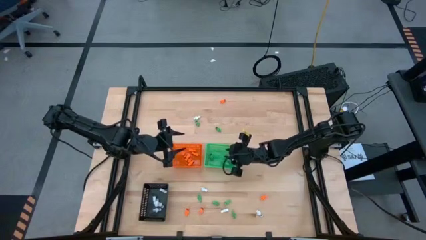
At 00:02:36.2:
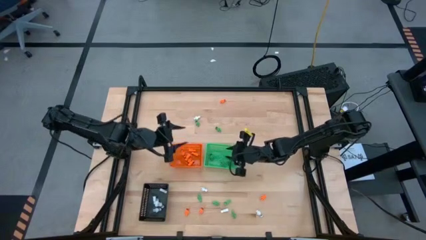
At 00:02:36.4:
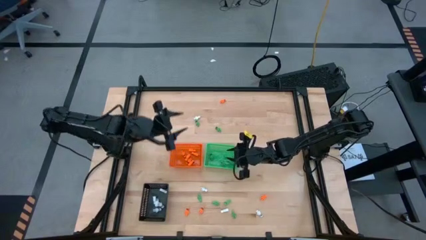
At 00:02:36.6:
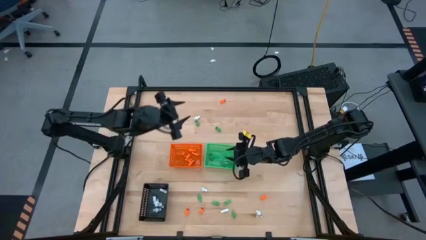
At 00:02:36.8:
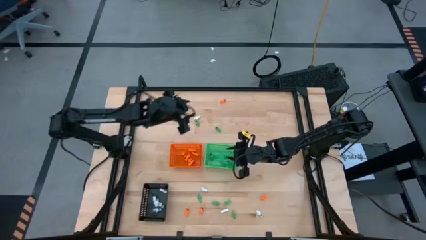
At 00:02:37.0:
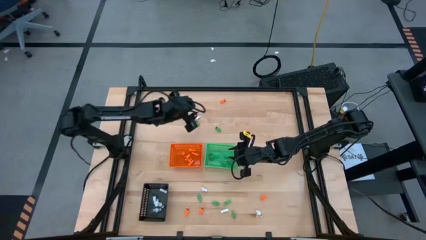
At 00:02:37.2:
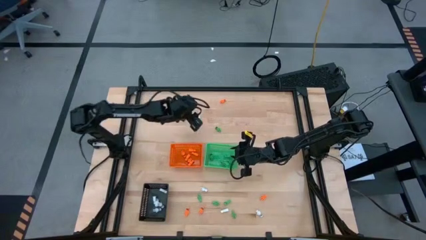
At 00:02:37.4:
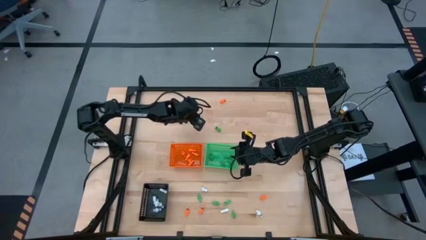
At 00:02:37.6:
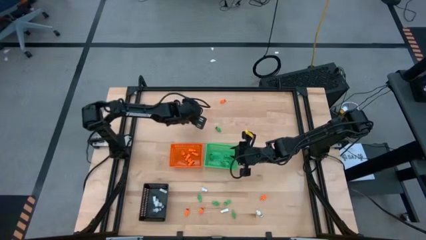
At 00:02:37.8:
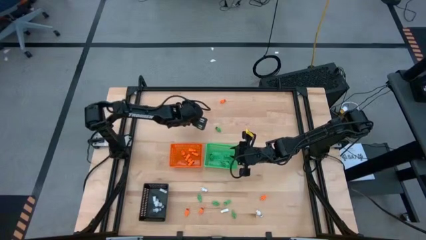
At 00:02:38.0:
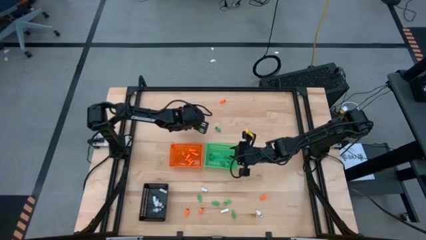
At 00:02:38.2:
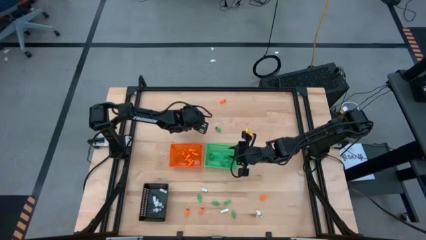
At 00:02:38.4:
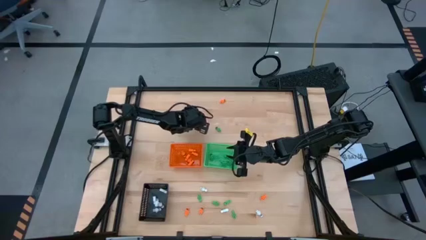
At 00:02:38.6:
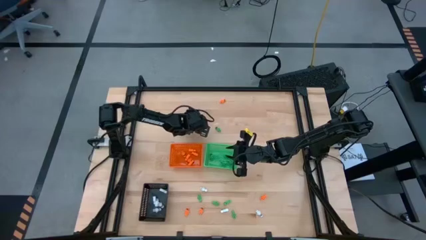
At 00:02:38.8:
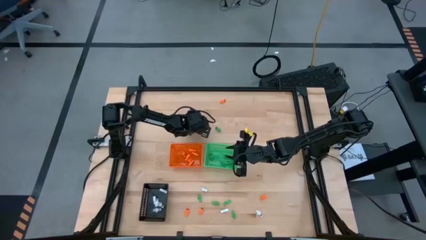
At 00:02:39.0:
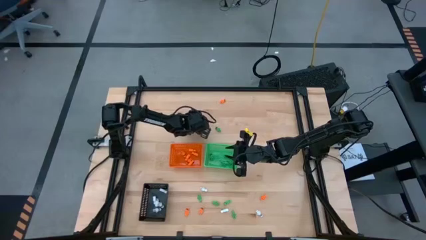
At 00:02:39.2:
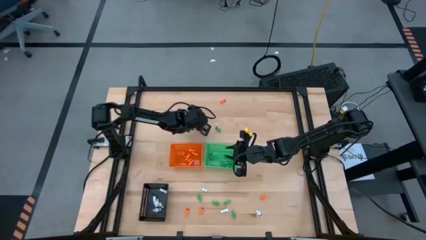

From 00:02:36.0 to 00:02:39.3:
Task: Sort Halloween decoration
Put the green skeleton toy into the green bin

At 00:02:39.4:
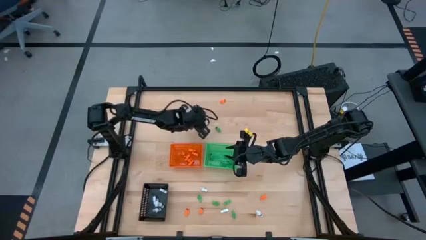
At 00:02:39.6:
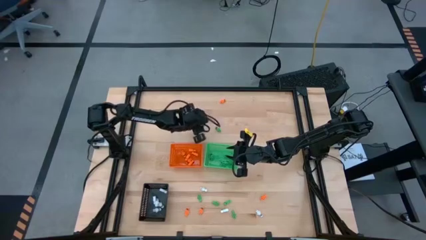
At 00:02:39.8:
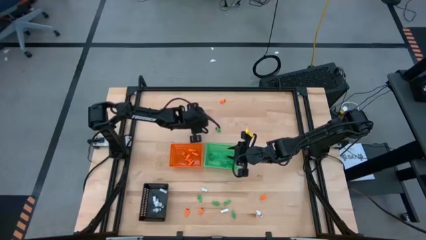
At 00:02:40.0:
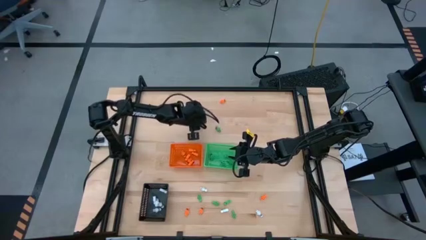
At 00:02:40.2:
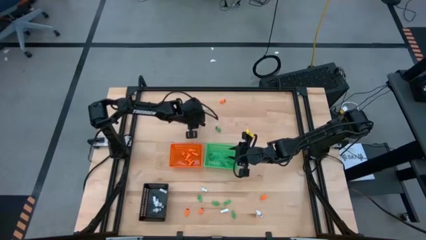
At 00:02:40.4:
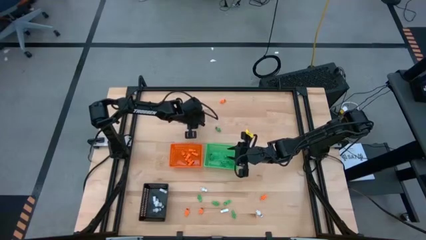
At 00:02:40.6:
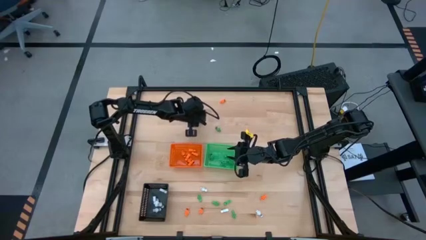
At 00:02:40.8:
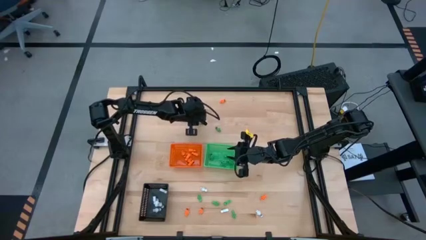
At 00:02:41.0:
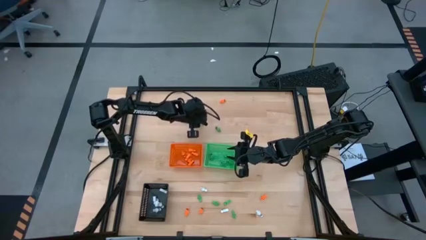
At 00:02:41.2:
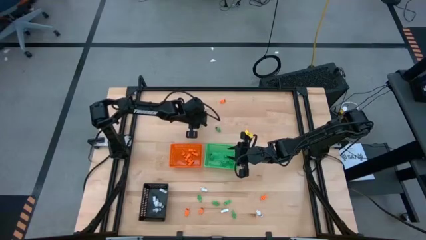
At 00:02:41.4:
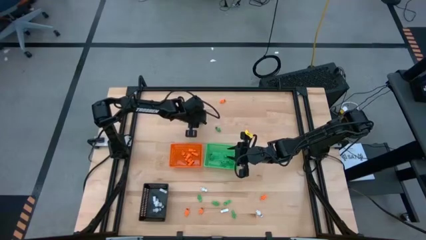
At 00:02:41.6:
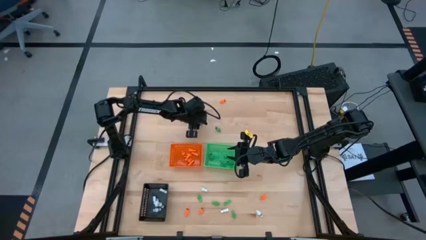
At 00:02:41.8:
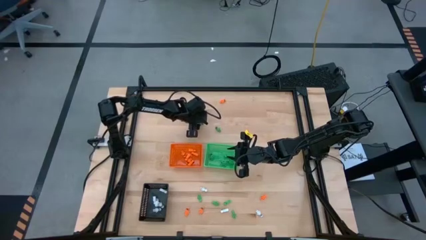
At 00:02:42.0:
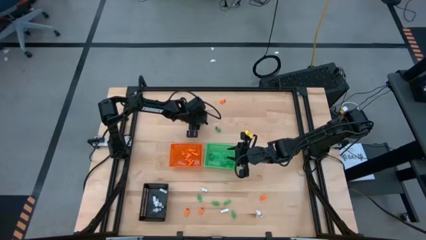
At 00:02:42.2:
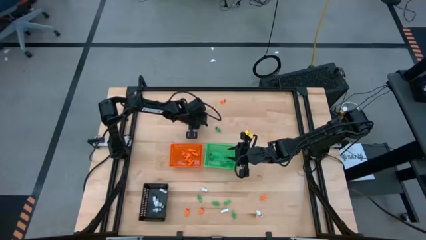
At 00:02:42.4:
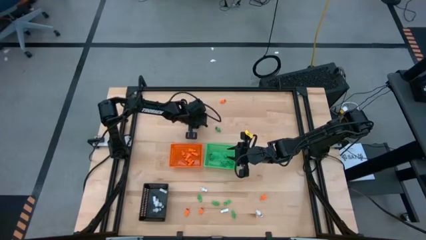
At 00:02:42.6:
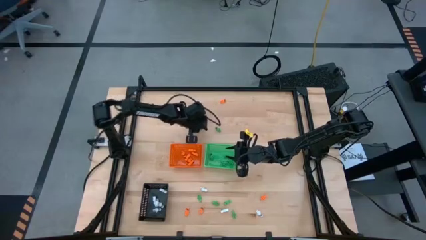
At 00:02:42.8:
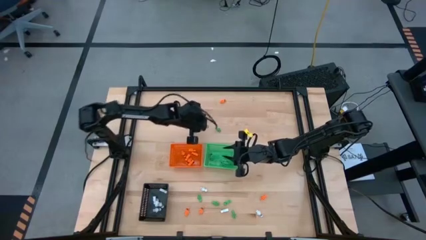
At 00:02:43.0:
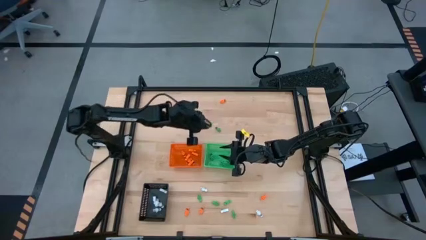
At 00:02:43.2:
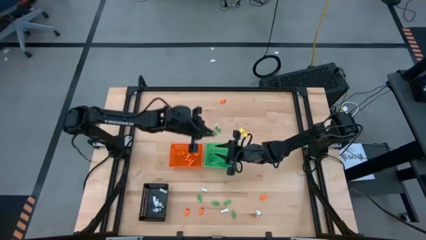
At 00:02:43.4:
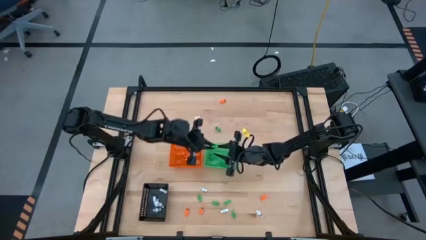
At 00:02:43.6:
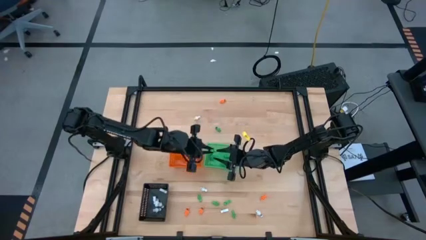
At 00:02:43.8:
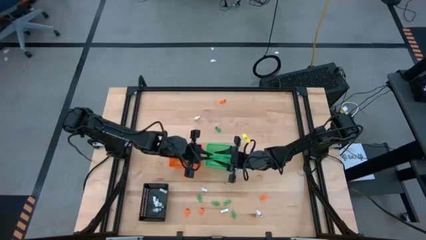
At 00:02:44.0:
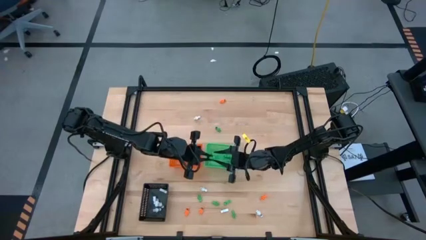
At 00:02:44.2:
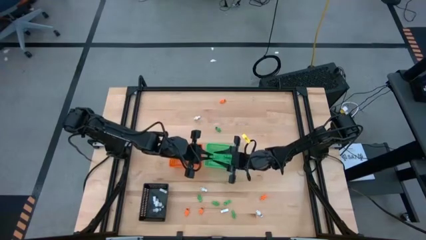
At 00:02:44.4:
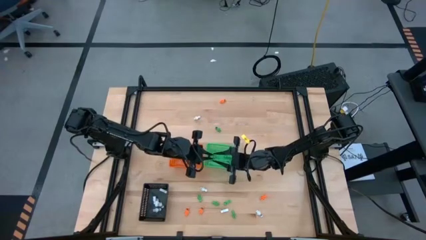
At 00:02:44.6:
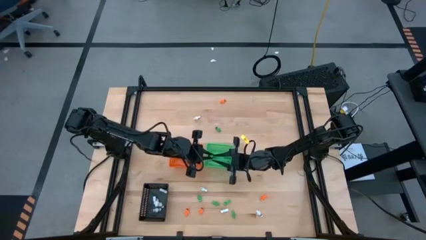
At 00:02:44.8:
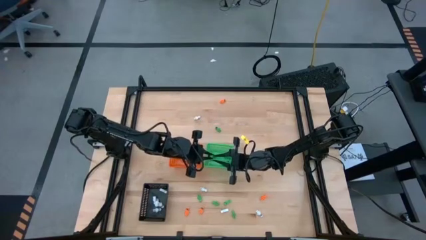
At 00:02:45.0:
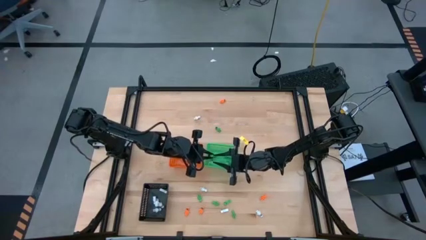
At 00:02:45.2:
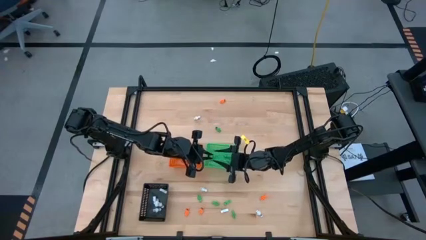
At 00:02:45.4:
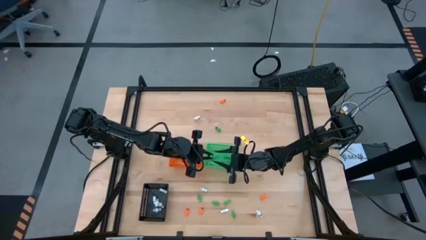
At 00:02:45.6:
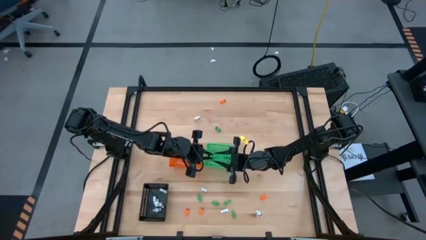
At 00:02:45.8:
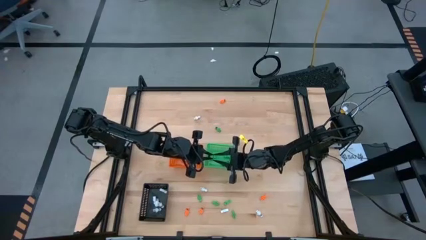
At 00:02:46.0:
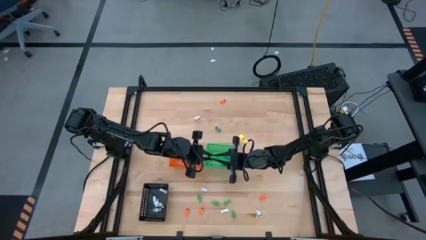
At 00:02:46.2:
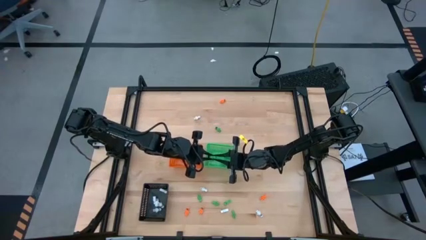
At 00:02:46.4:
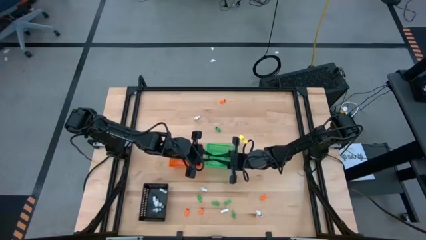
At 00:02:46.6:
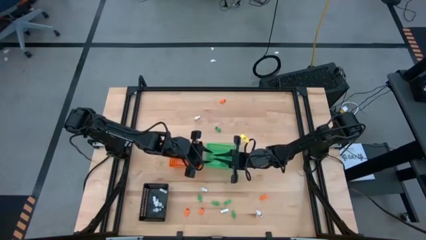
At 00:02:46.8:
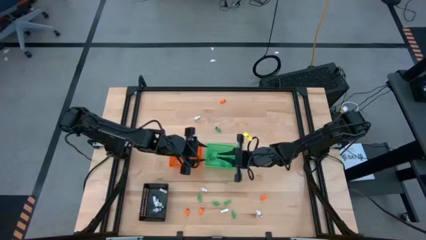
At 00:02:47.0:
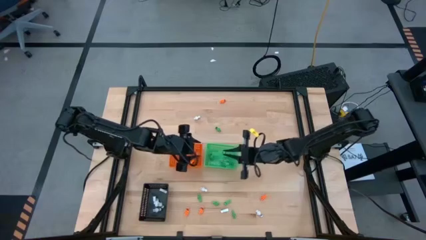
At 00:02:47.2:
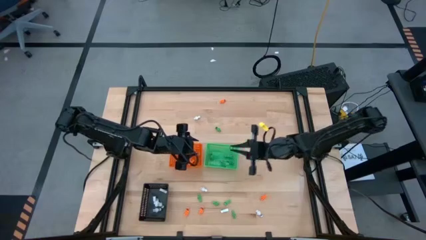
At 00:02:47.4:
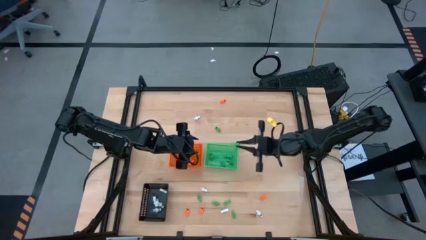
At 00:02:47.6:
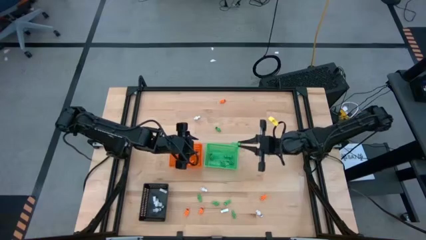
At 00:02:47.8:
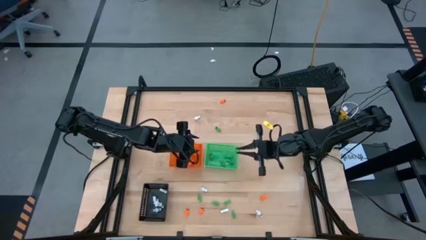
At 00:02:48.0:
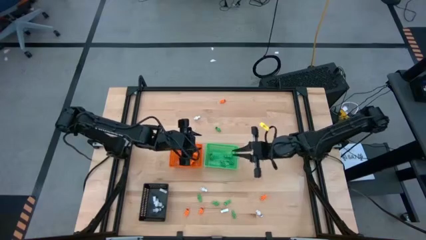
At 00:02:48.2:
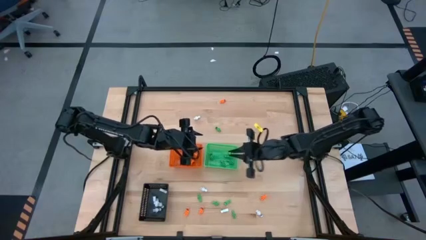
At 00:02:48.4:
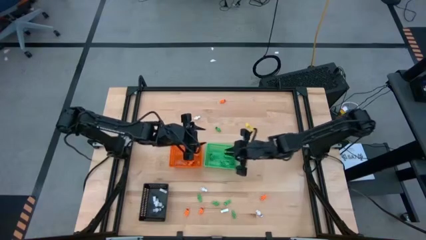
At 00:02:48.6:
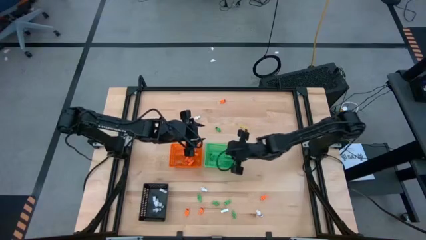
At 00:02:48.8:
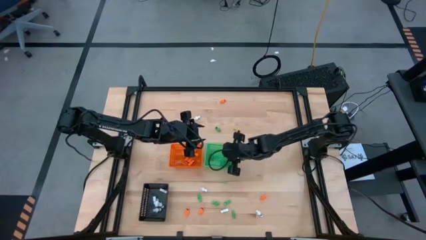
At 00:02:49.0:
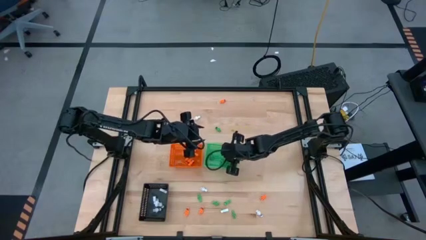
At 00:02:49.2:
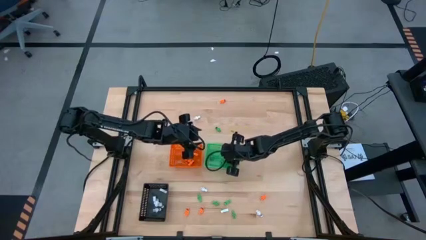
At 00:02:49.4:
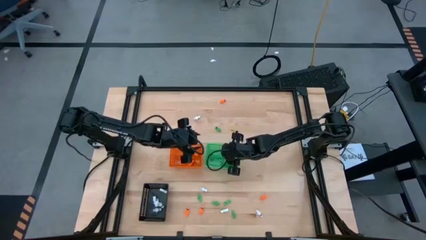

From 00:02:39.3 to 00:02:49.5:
Put the green skeleton toy into the green bin
